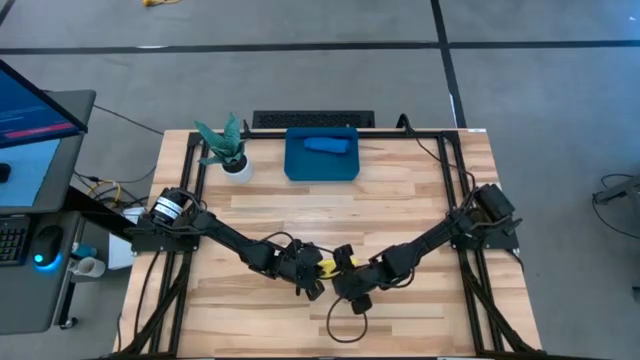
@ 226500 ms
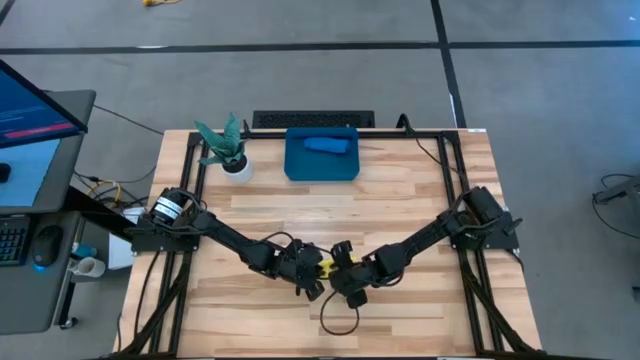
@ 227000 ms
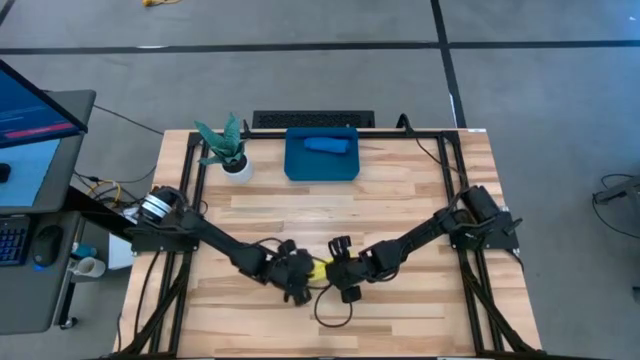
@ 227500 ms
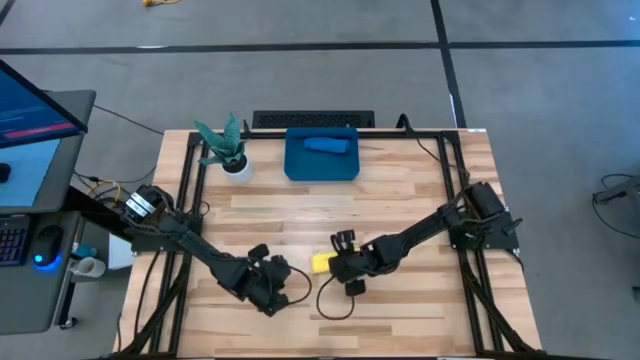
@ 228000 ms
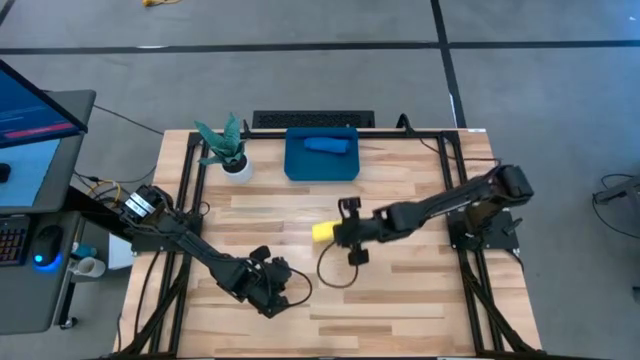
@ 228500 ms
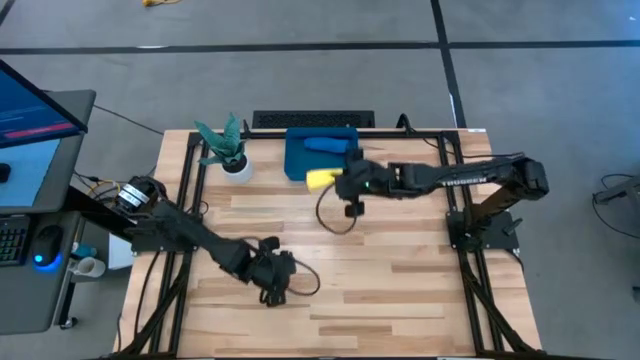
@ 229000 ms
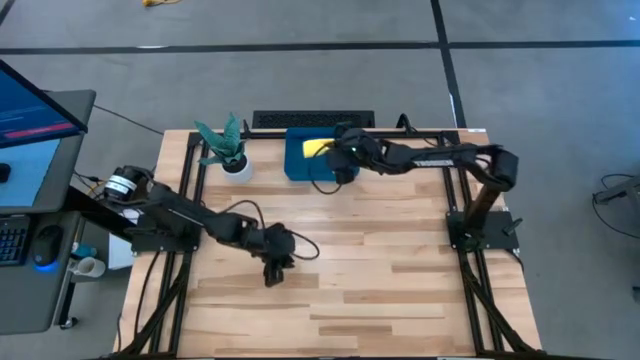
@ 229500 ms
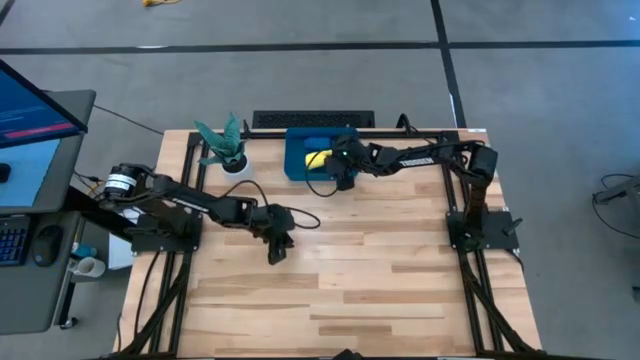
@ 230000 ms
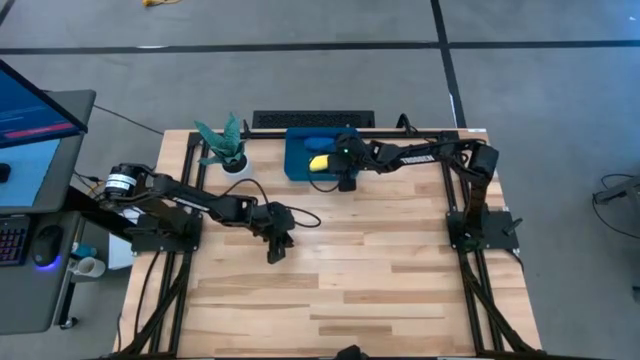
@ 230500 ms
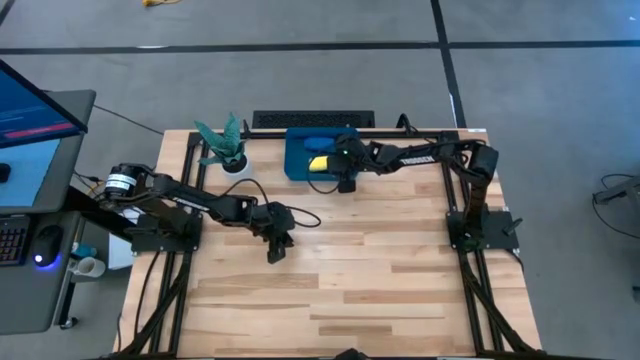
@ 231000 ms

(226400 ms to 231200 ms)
Task: Roll microfiber towels into tight, uniform cylinder then place into a basket
Put the rolled yellow microfiber towel into the blue bin

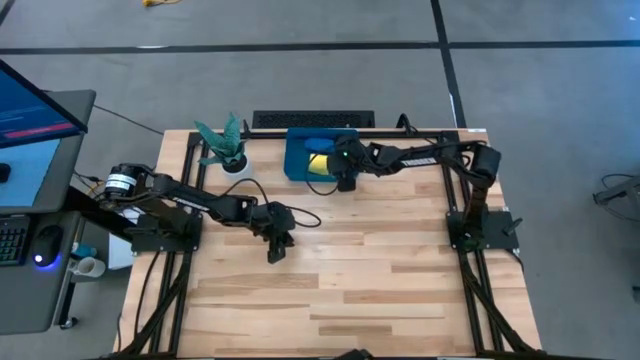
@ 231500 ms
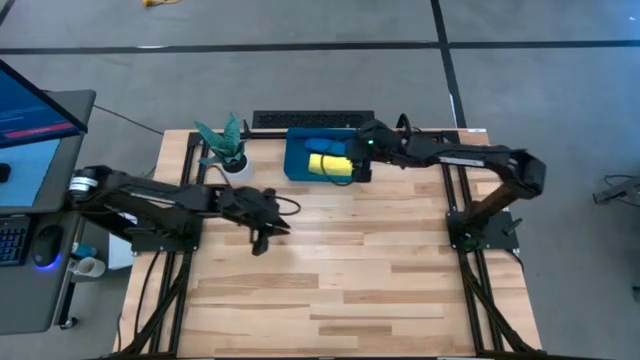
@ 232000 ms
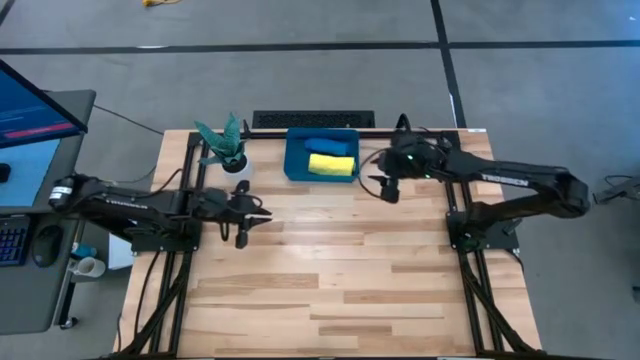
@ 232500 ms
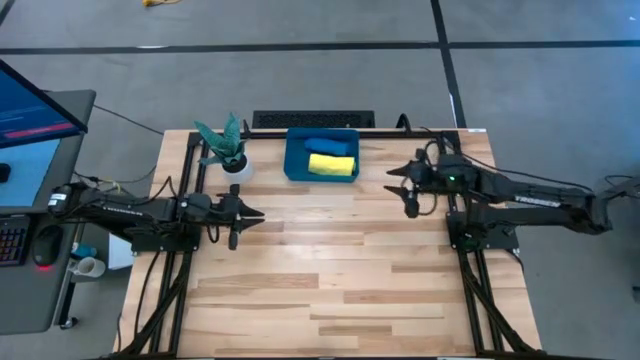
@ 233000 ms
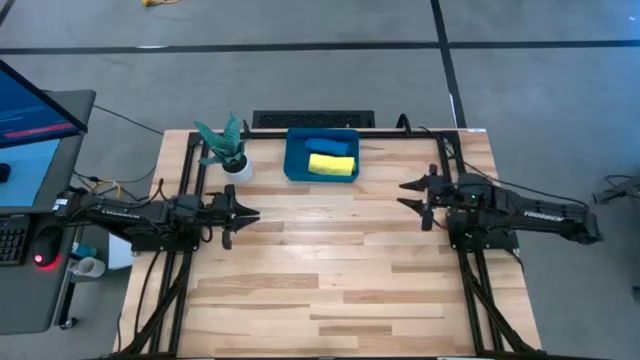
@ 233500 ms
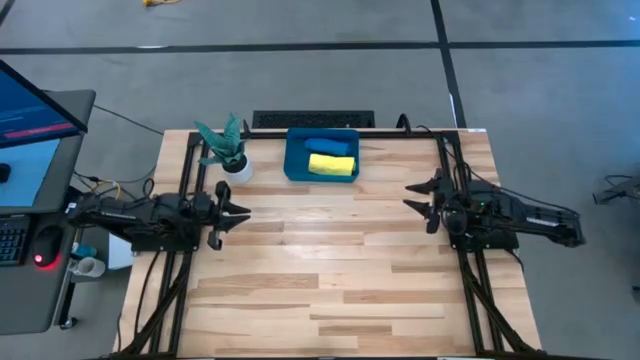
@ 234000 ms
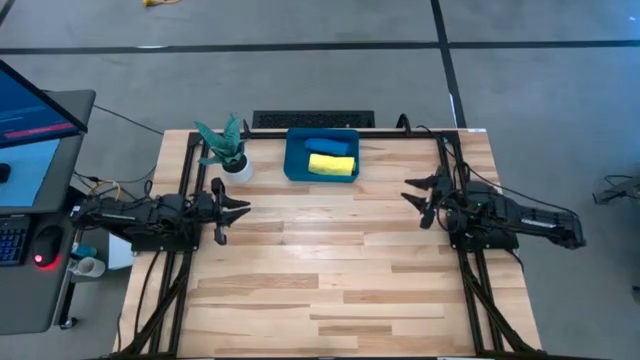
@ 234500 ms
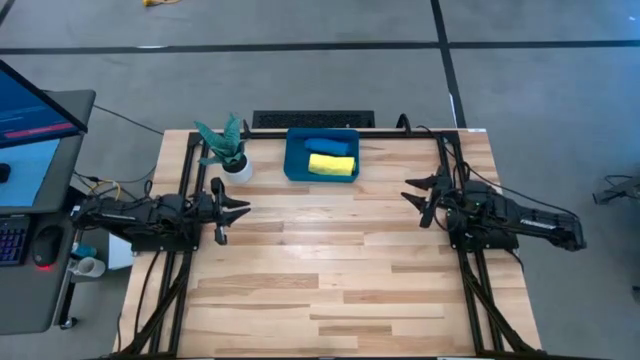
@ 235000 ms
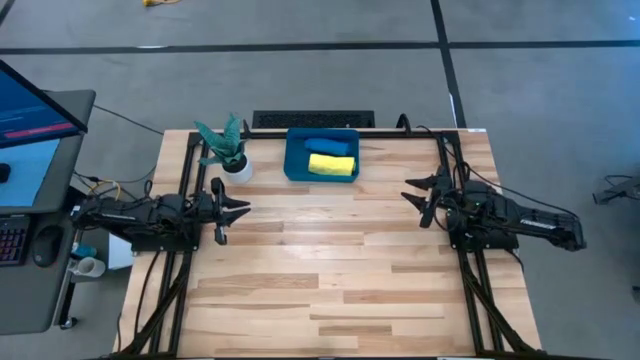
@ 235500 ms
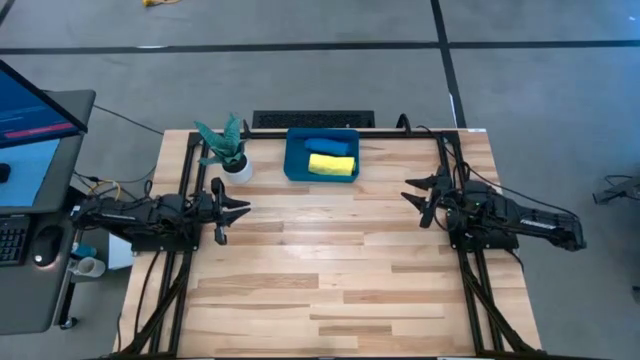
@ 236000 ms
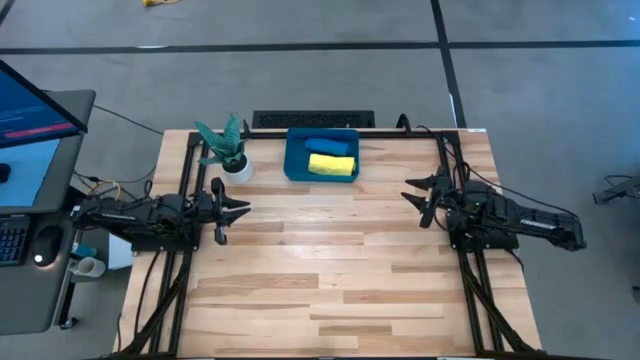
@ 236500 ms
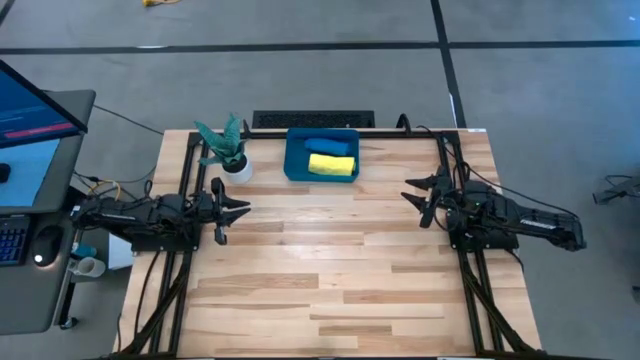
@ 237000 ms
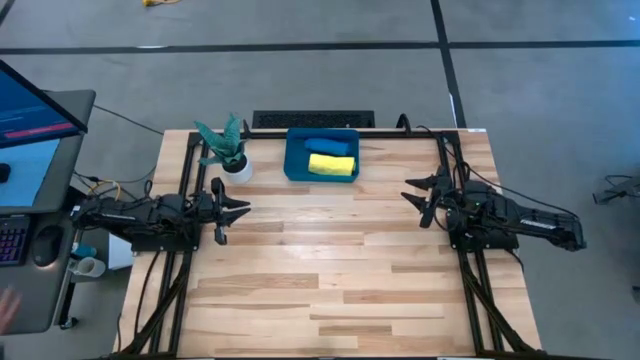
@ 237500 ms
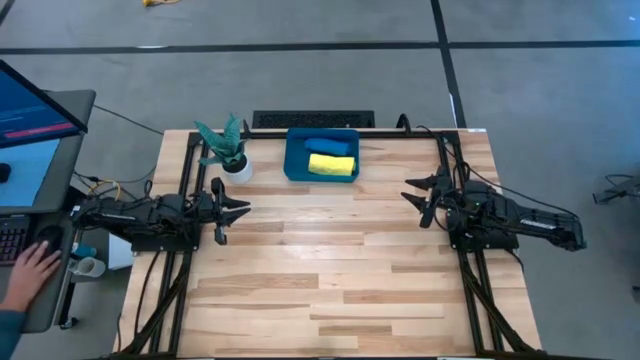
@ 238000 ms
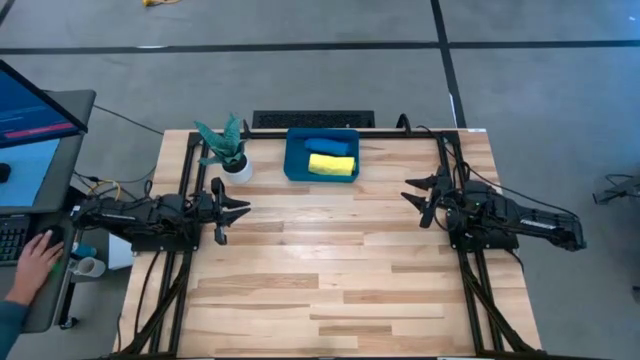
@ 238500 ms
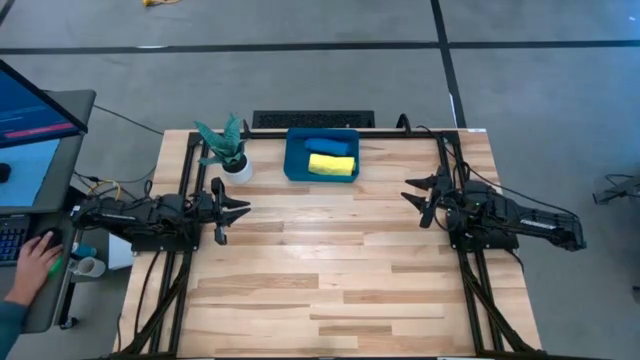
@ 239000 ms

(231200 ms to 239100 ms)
Return to Home Position

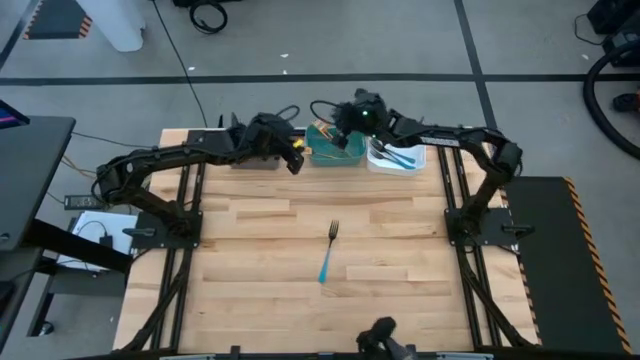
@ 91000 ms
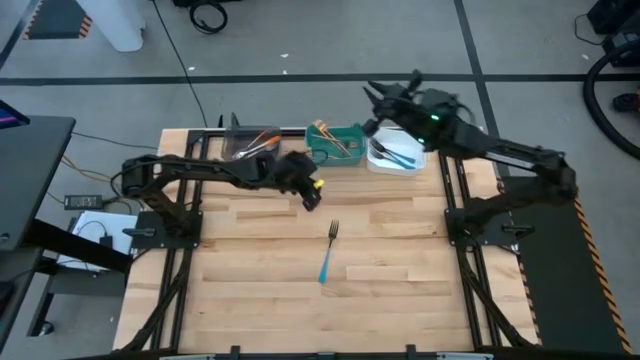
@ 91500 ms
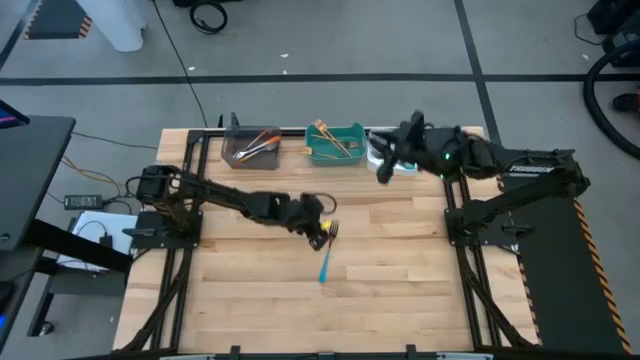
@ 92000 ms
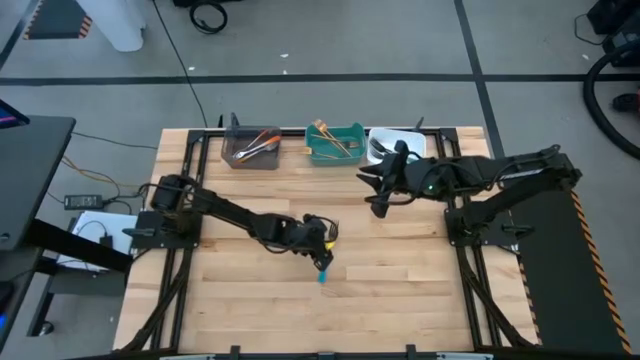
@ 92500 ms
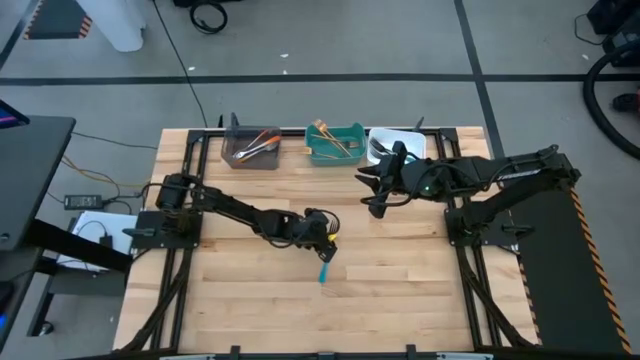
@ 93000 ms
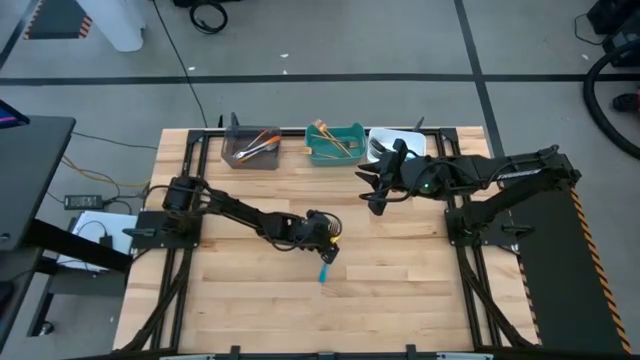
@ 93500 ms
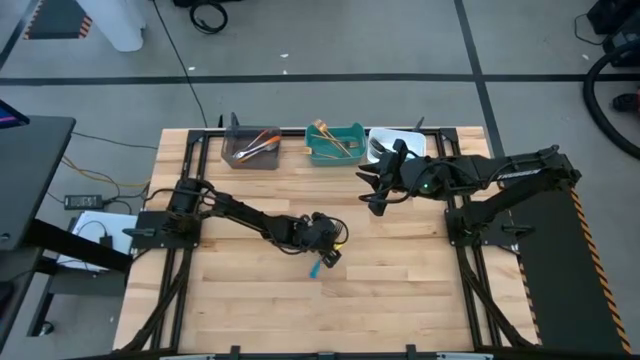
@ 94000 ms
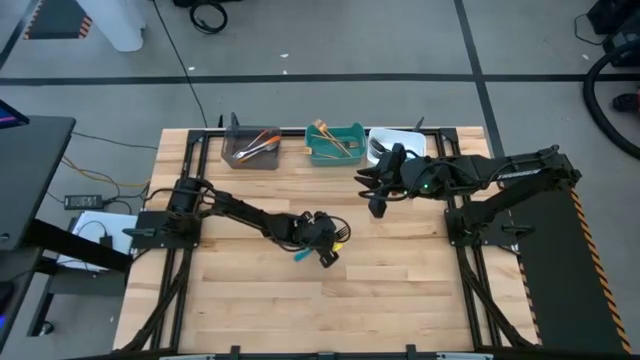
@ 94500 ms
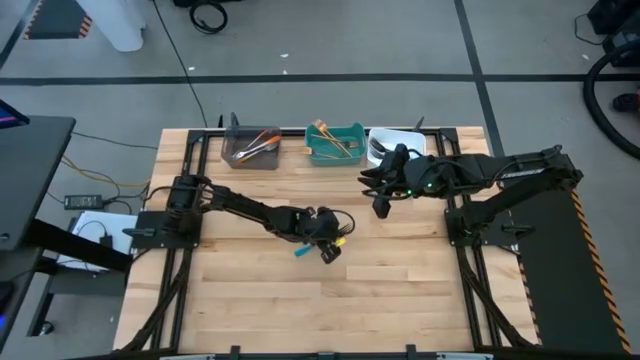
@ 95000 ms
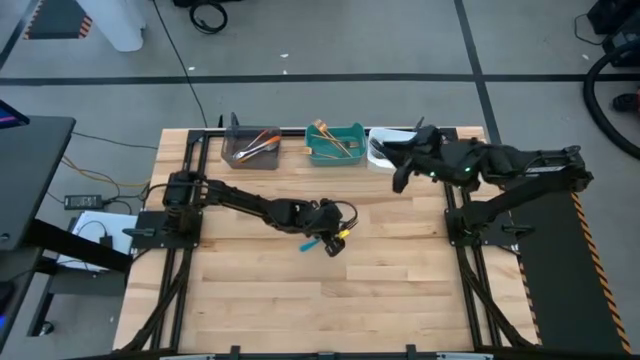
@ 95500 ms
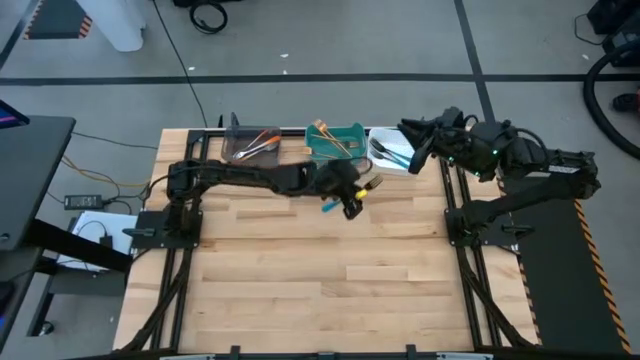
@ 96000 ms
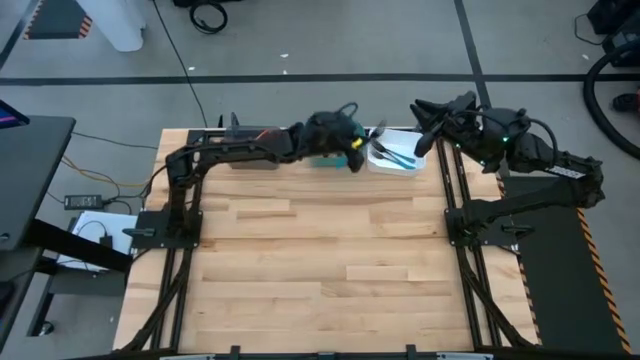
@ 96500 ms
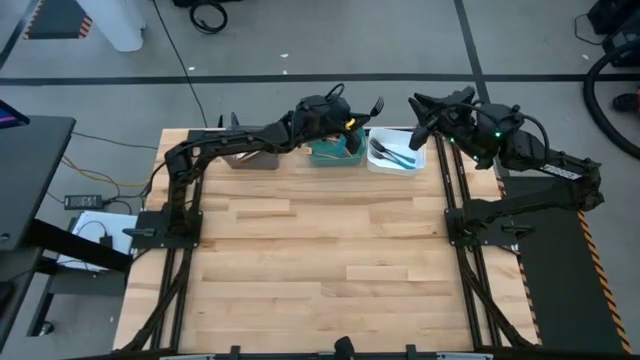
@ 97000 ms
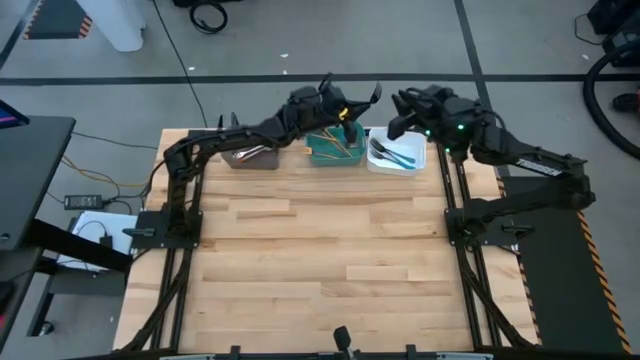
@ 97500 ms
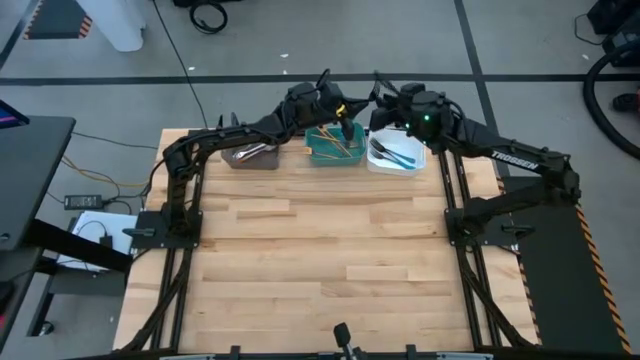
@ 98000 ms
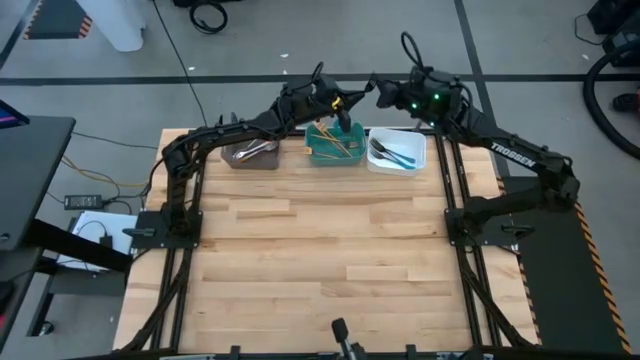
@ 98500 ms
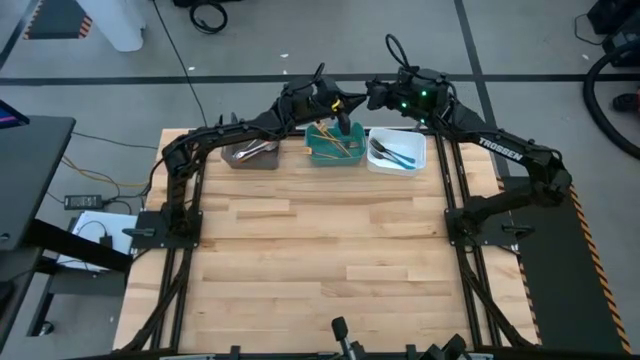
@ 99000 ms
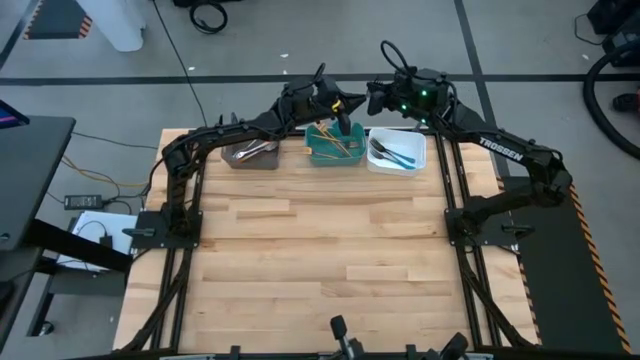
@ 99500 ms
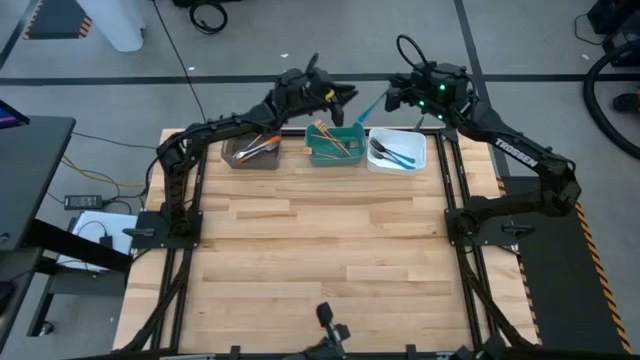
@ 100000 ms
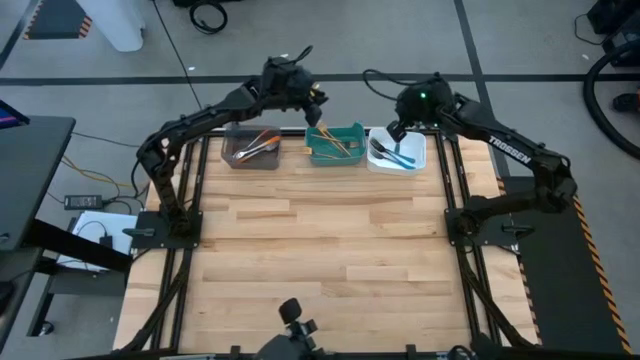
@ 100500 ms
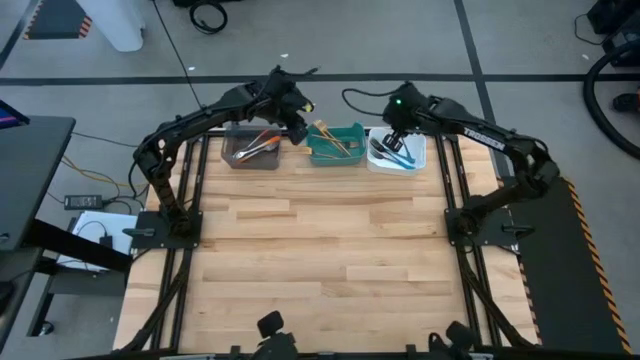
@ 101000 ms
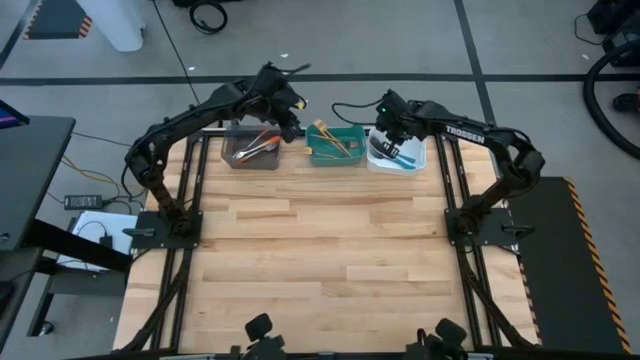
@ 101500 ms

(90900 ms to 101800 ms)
Task: Sort silverware by color (type)
Put the blue fork into the white bin
